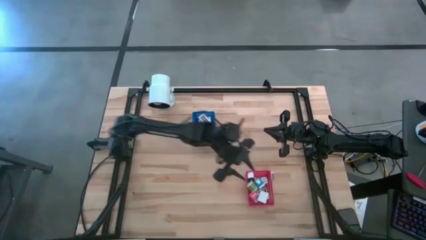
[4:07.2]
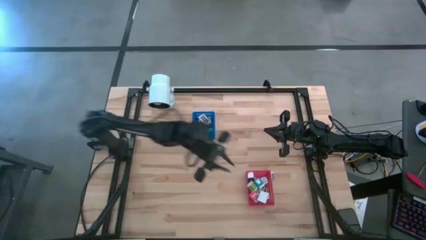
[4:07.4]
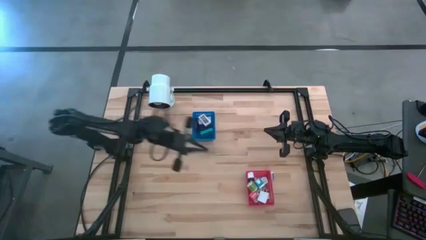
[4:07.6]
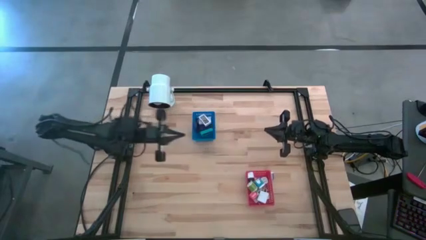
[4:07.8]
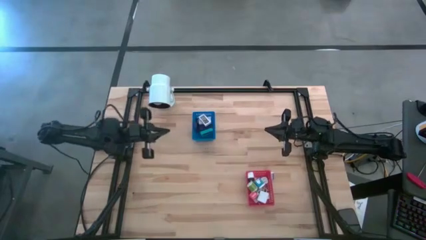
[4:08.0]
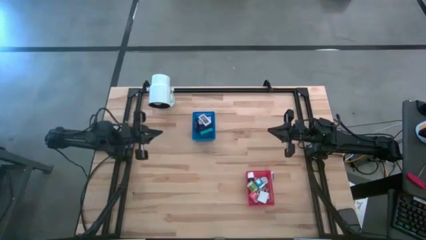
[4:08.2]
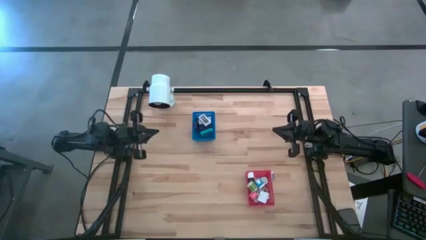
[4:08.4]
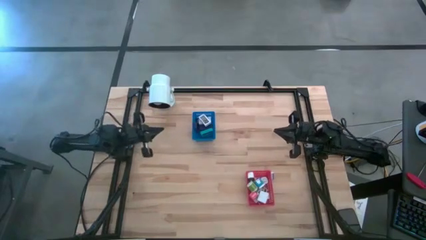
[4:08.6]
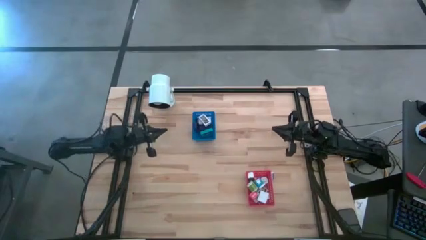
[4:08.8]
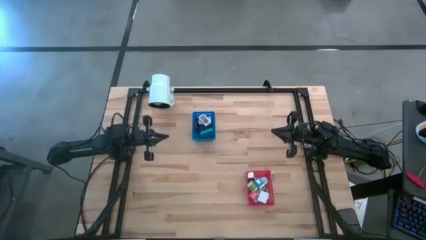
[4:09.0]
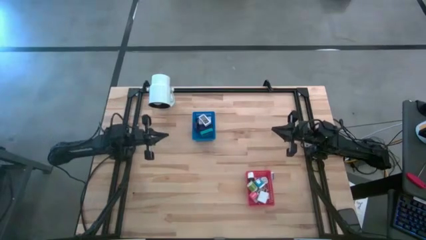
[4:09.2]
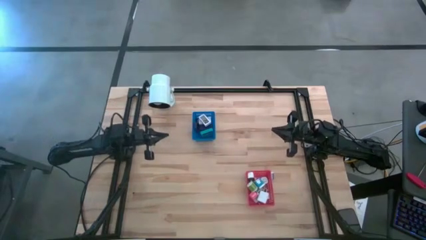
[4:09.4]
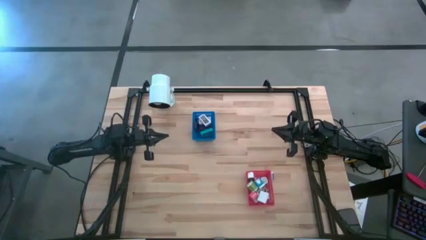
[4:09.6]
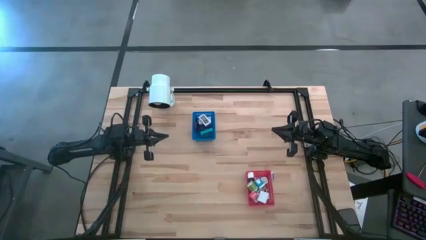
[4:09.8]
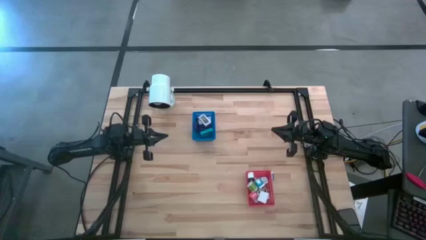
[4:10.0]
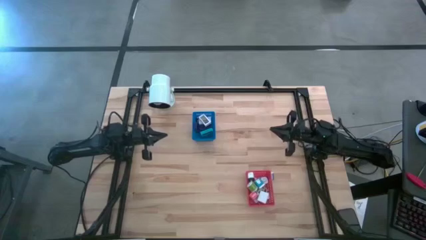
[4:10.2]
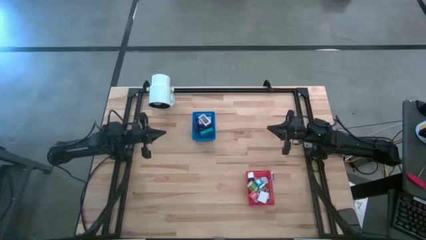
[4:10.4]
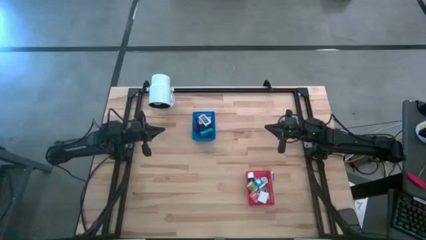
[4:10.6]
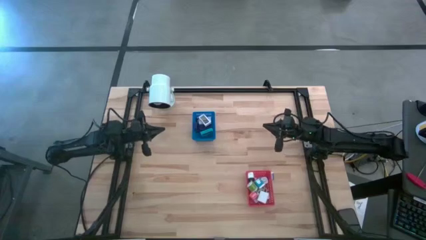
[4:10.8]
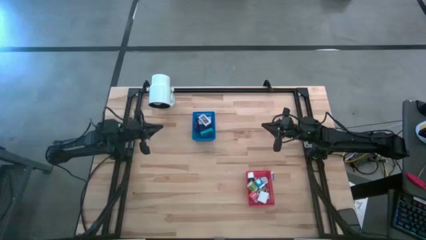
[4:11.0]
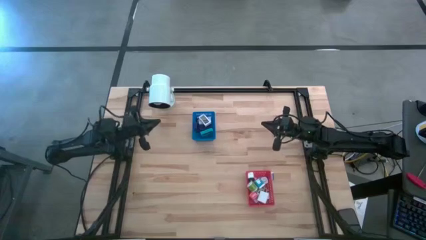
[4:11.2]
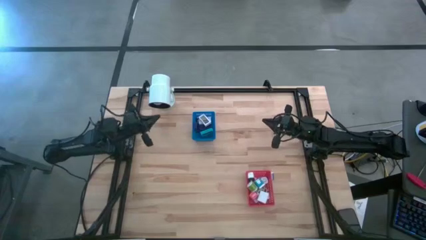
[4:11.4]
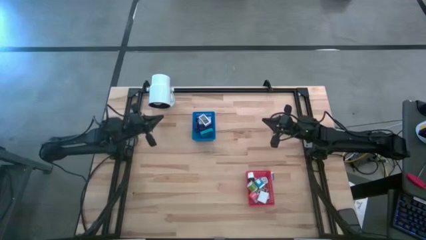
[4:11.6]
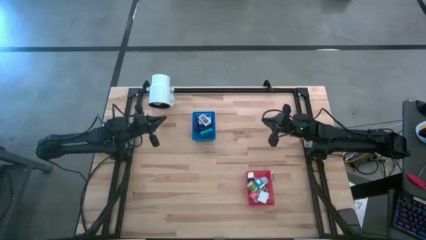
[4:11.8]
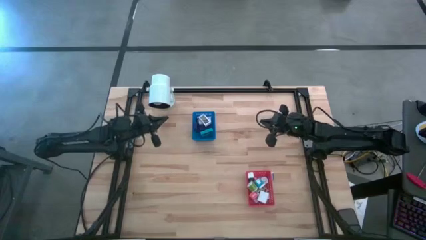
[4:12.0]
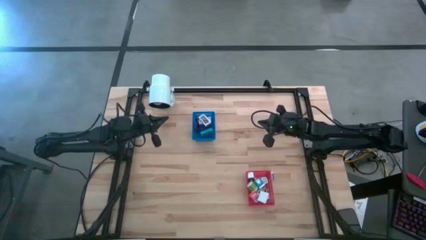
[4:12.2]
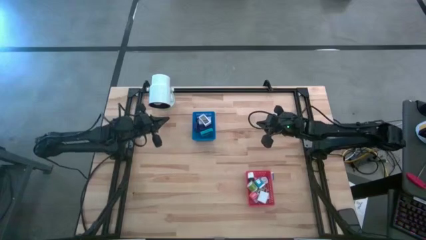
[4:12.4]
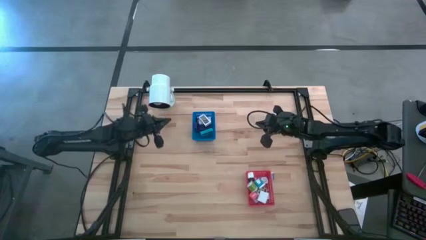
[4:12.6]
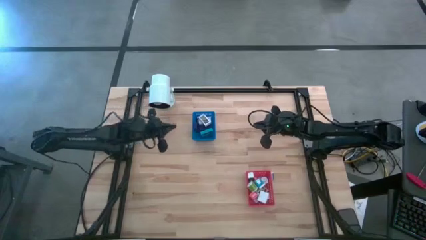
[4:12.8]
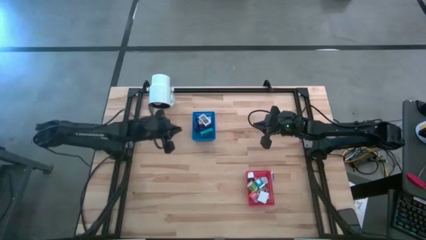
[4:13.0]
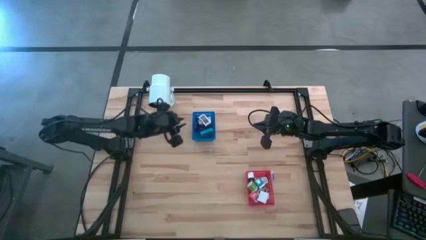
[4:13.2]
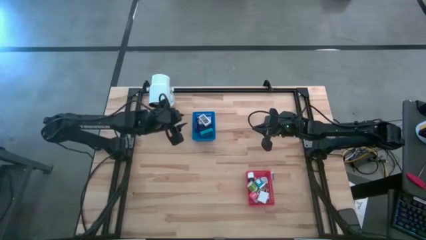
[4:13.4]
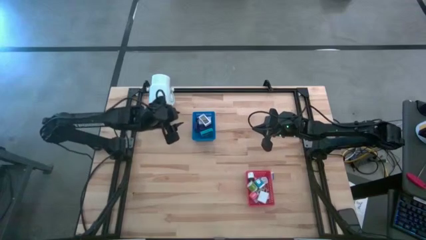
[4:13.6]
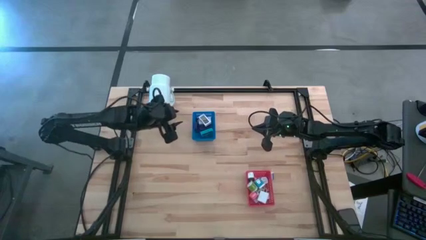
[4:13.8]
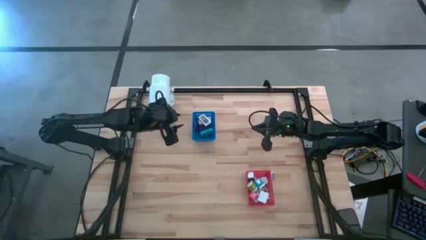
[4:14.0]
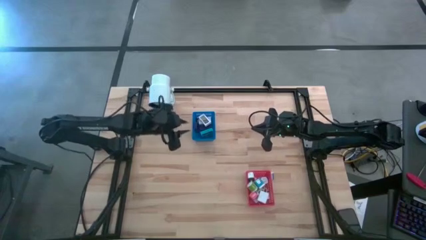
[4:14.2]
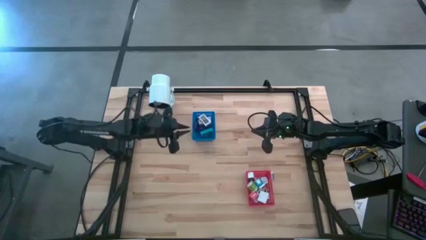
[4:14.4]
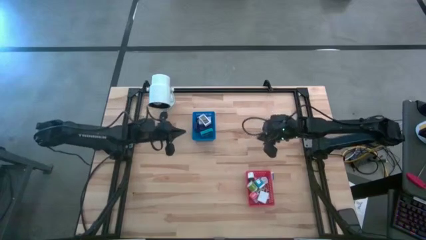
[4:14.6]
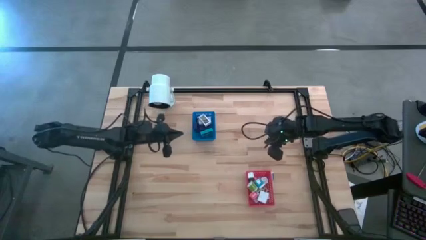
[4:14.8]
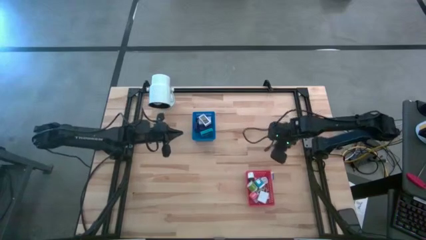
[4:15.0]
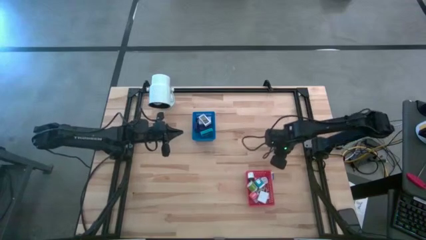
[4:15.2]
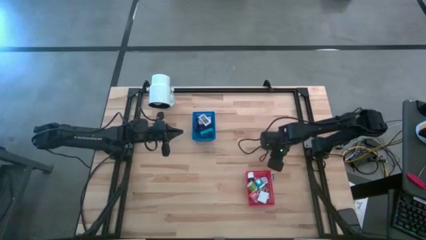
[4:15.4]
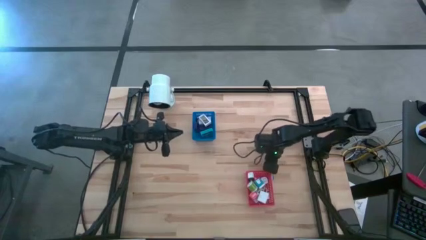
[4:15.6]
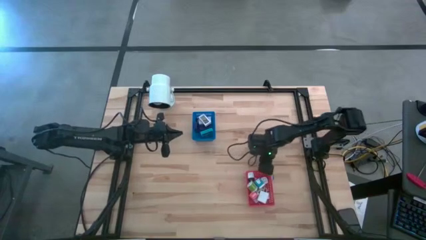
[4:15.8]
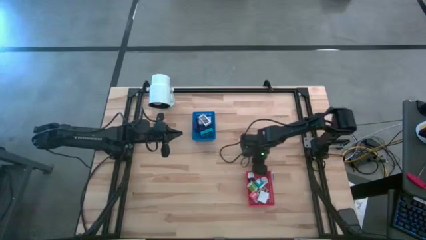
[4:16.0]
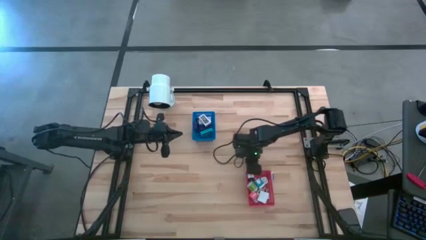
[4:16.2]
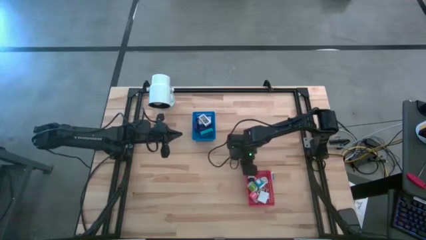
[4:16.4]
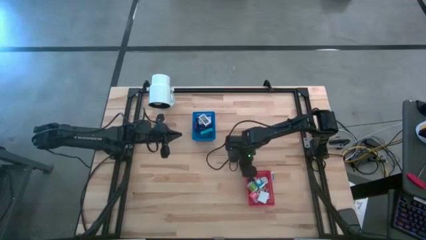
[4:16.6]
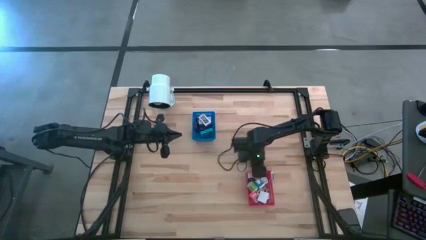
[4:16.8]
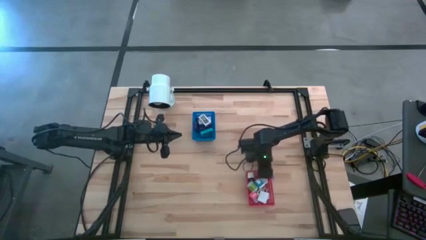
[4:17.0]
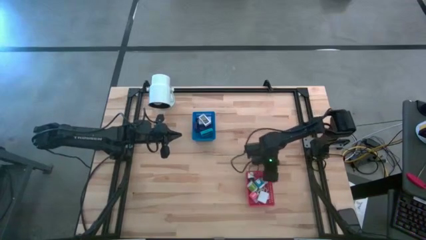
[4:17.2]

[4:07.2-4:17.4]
Task: Pick & Place Office items
Put the purple charger adapter into the red bin

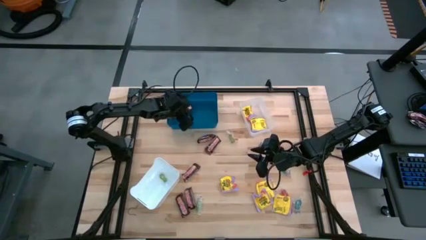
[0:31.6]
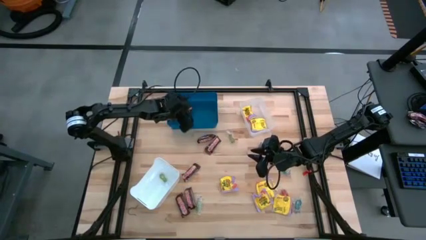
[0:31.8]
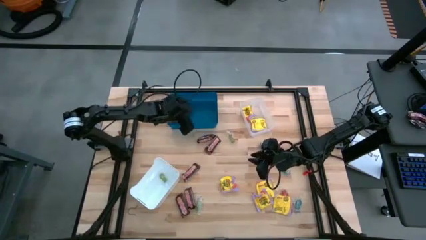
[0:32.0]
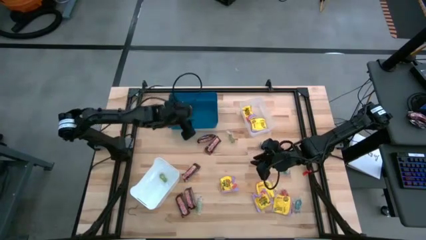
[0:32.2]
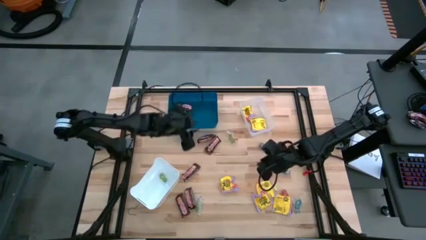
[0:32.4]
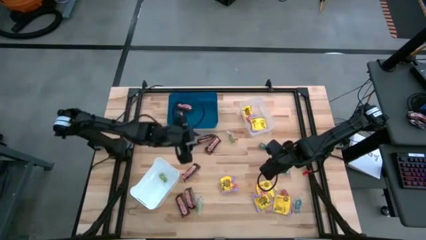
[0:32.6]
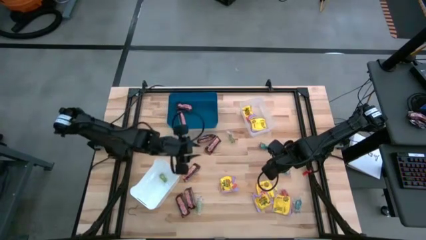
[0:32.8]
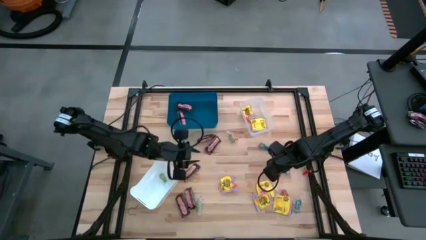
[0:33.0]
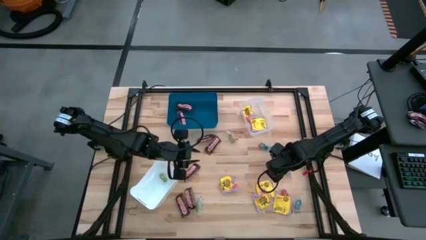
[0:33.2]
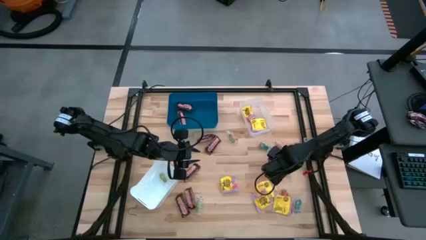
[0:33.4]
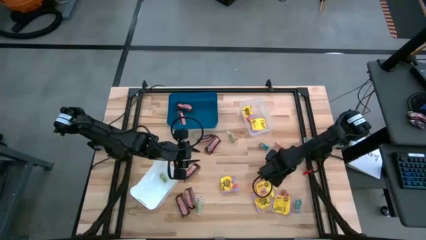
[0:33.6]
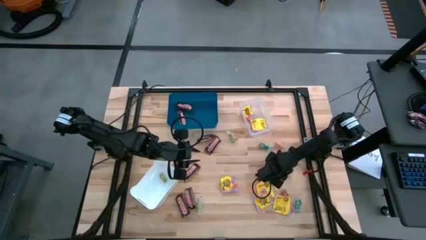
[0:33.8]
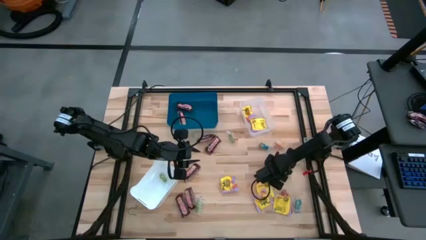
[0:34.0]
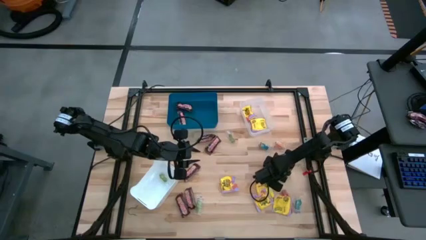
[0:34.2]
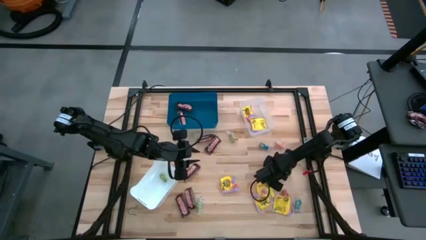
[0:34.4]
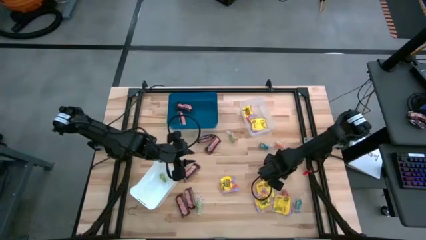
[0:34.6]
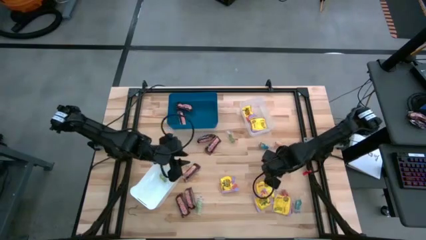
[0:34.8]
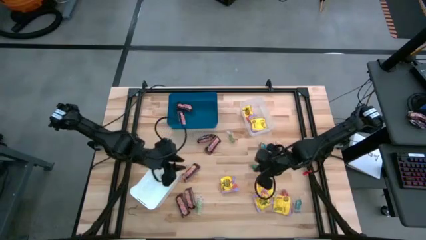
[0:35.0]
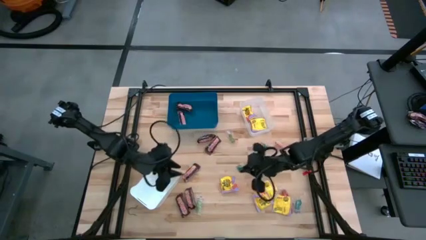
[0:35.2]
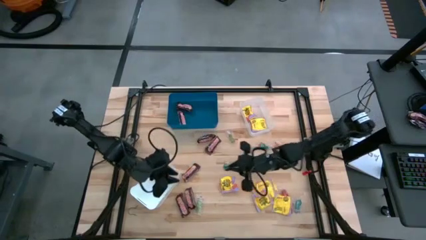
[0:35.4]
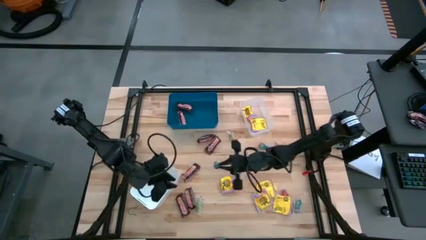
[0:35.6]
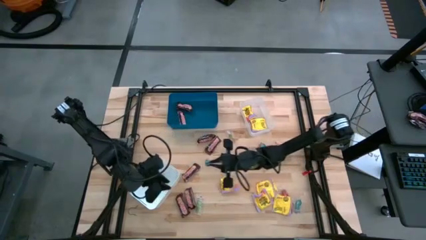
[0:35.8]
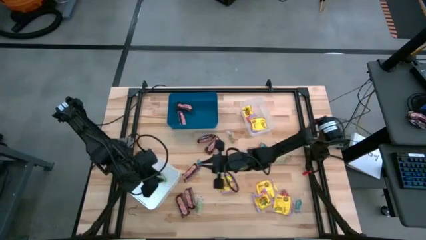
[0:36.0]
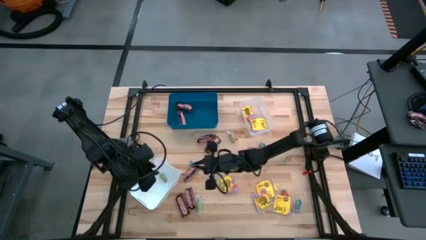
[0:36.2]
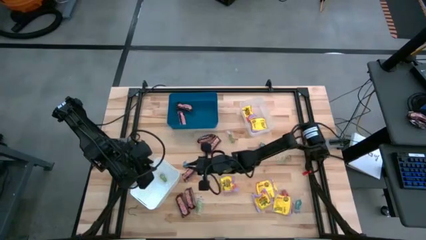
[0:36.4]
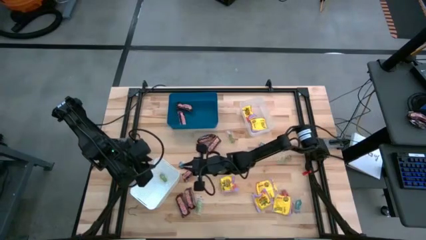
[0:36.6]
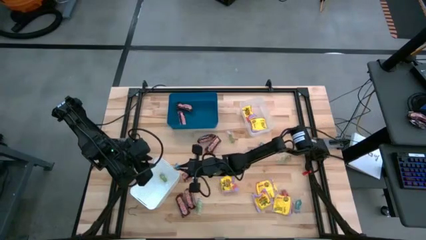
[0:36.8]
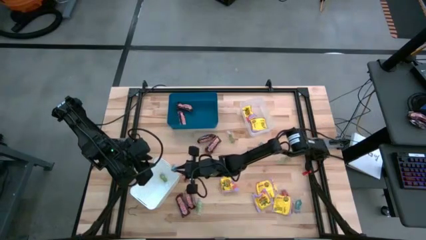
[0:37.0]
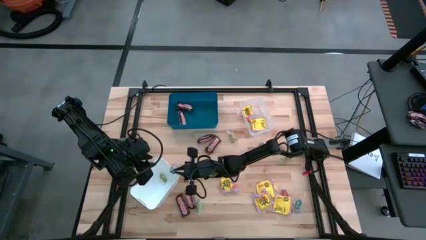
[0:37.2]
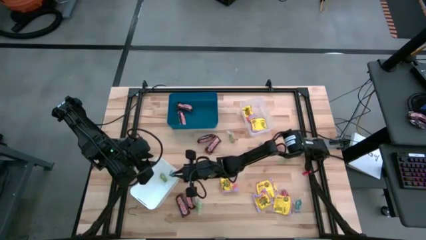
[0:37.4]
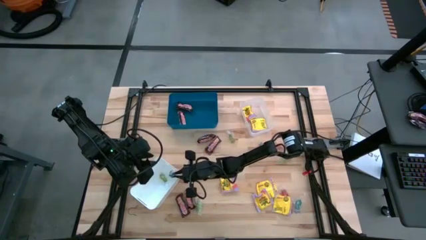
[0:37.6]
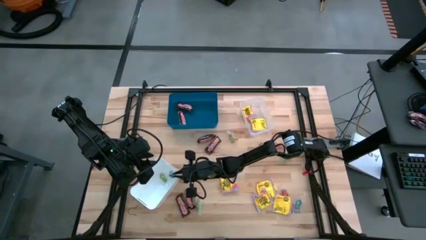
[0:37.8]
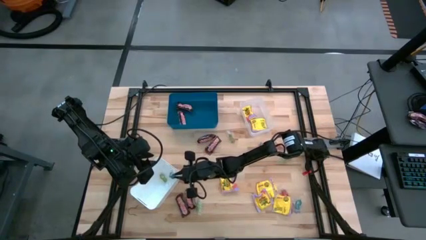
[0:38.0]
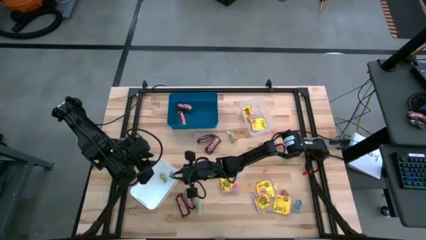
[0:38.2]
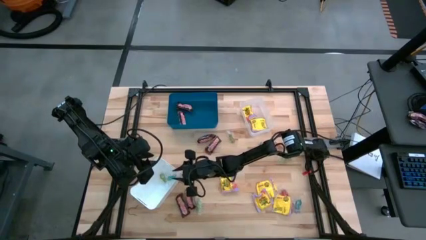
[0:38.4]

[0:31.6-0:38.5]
Task: Sort candy
Put the blue gummy into the white bin
